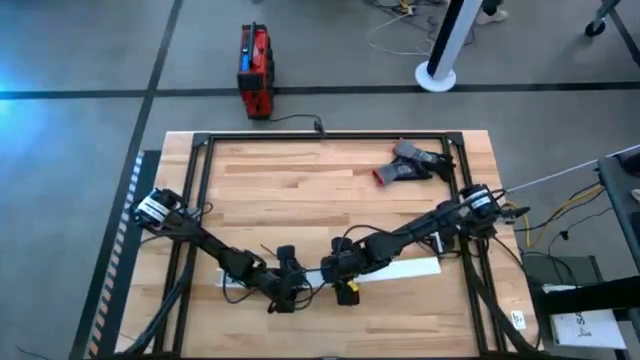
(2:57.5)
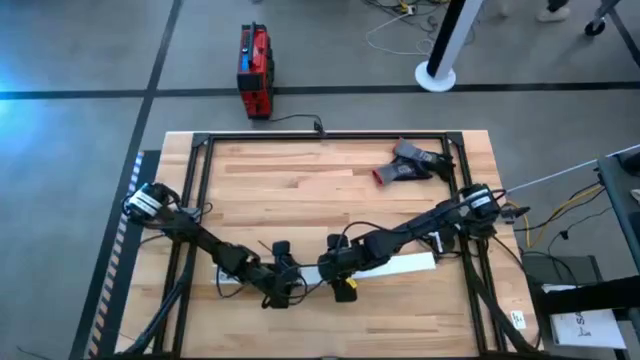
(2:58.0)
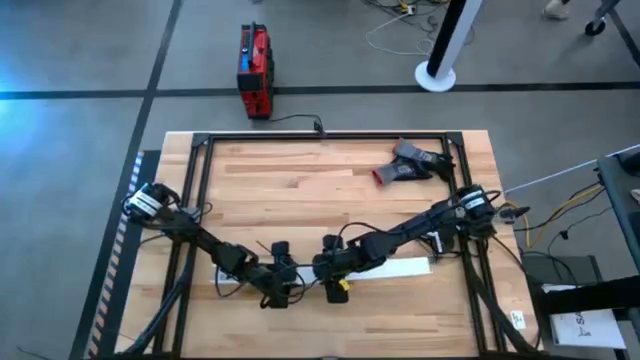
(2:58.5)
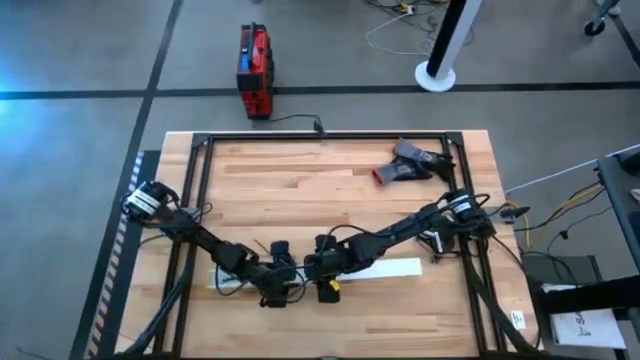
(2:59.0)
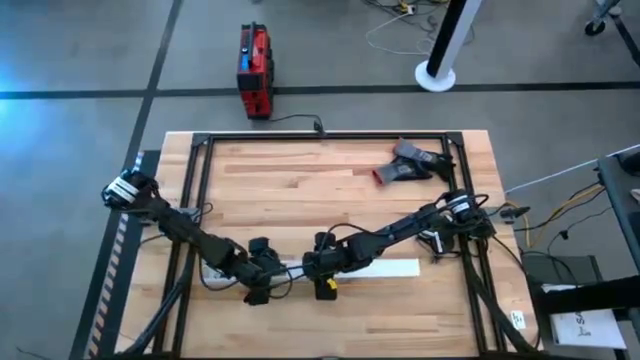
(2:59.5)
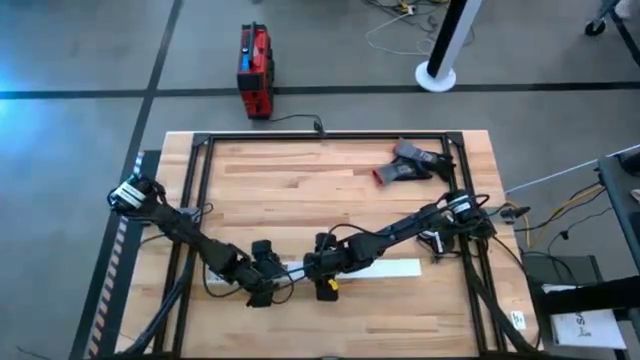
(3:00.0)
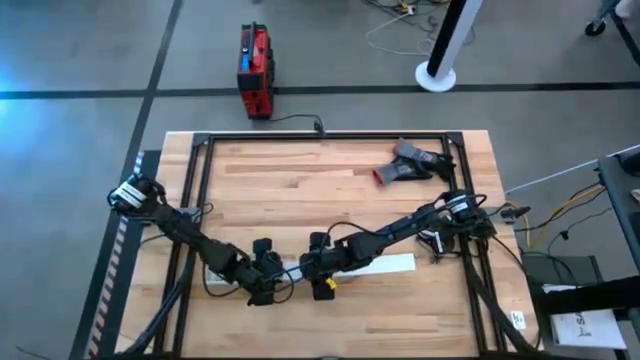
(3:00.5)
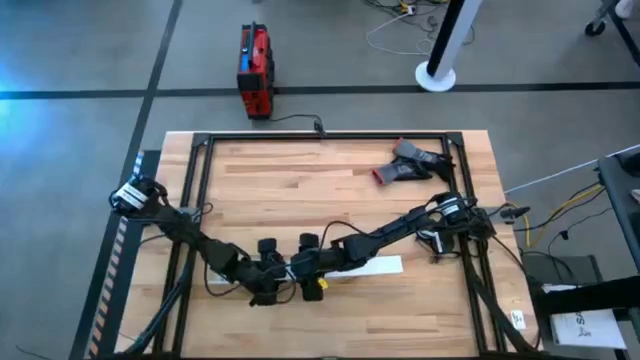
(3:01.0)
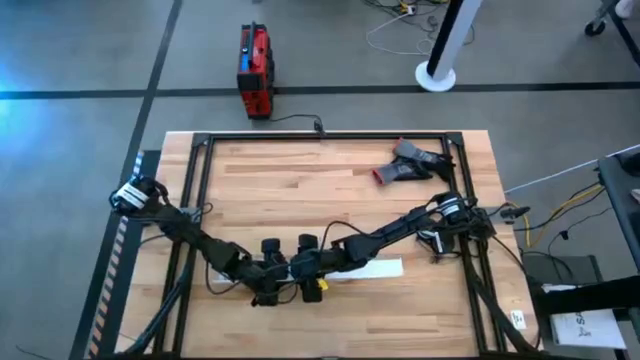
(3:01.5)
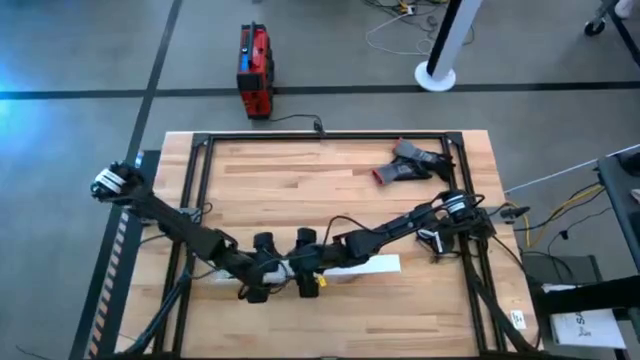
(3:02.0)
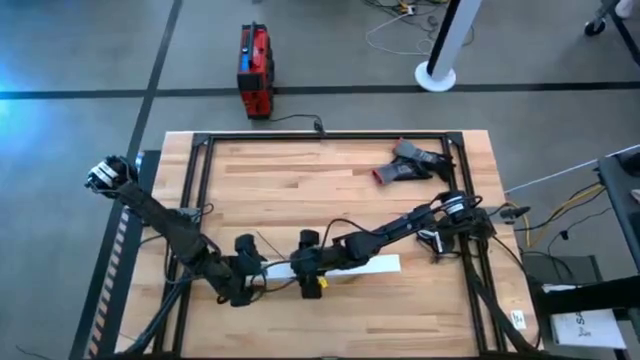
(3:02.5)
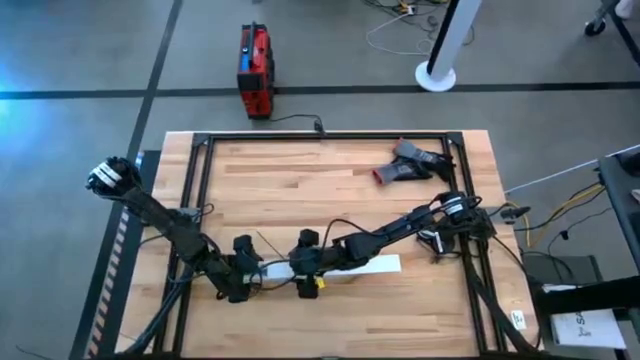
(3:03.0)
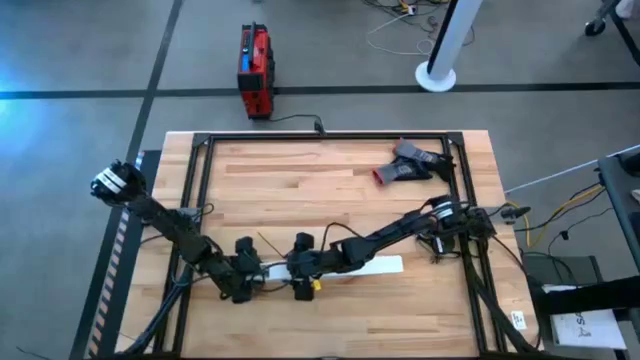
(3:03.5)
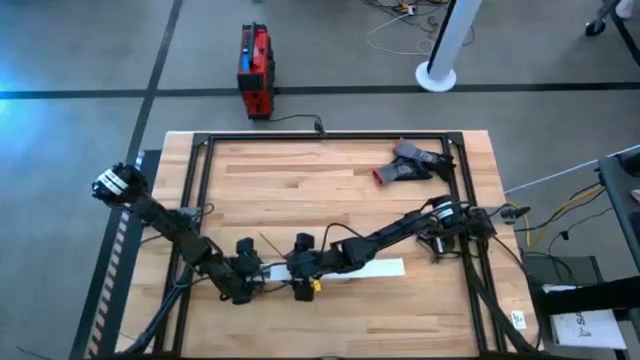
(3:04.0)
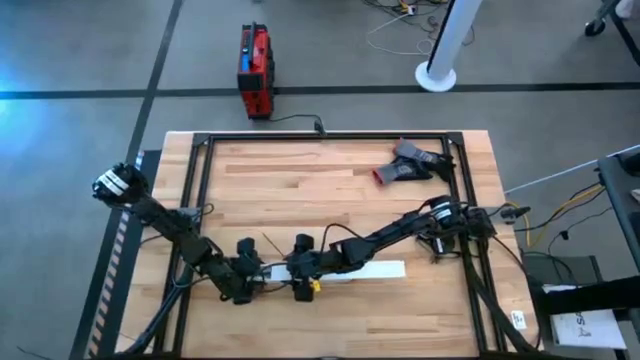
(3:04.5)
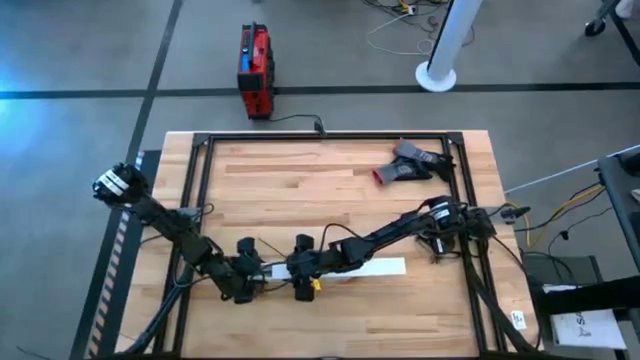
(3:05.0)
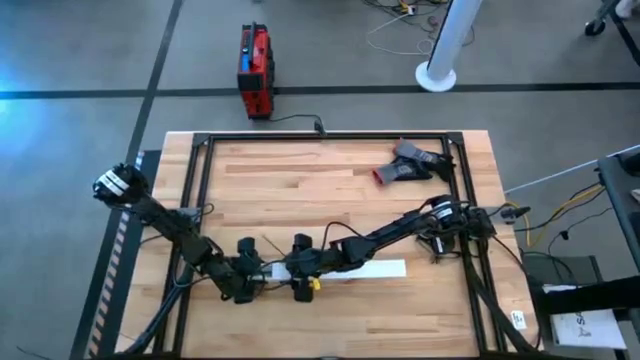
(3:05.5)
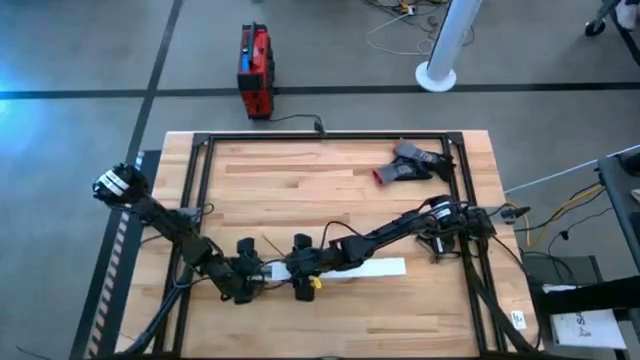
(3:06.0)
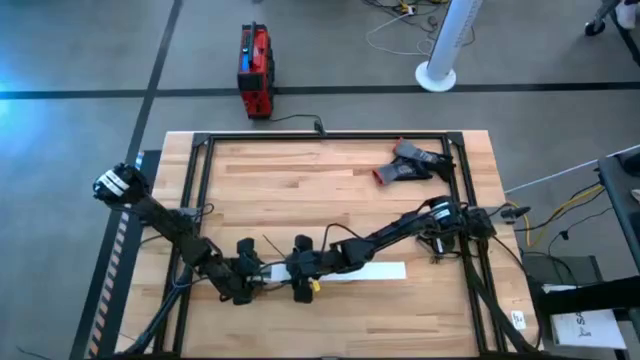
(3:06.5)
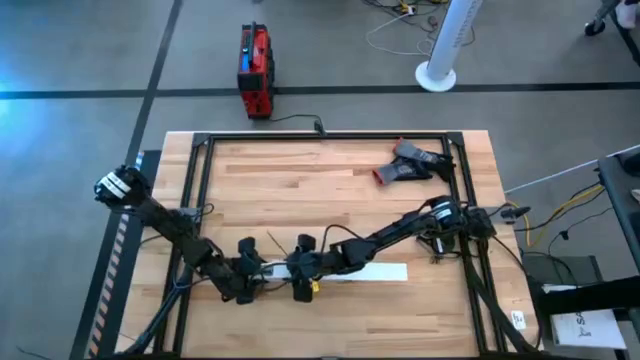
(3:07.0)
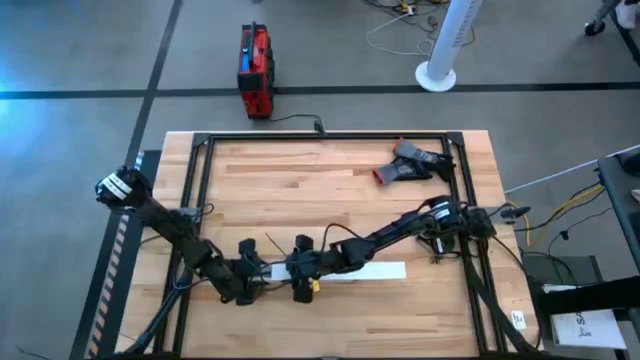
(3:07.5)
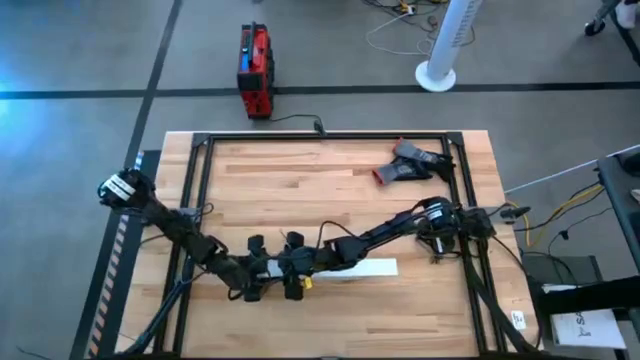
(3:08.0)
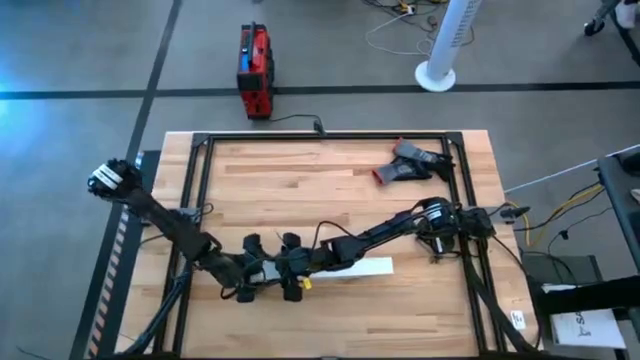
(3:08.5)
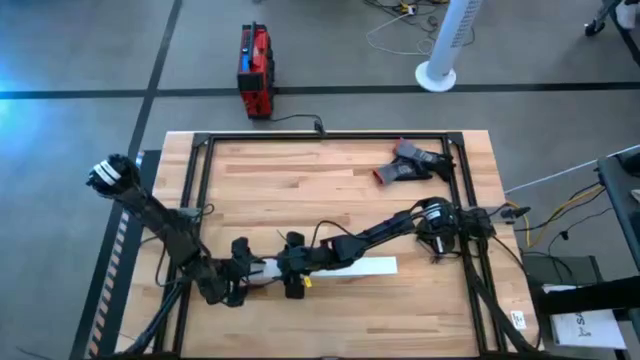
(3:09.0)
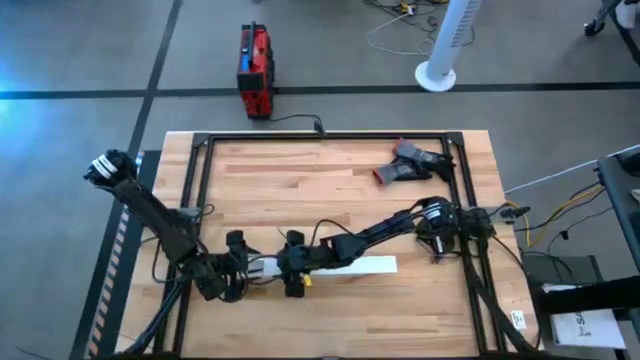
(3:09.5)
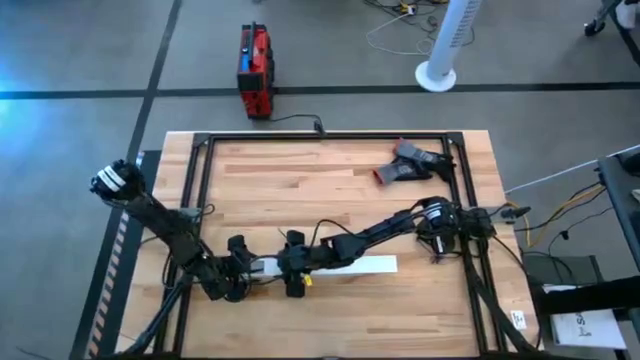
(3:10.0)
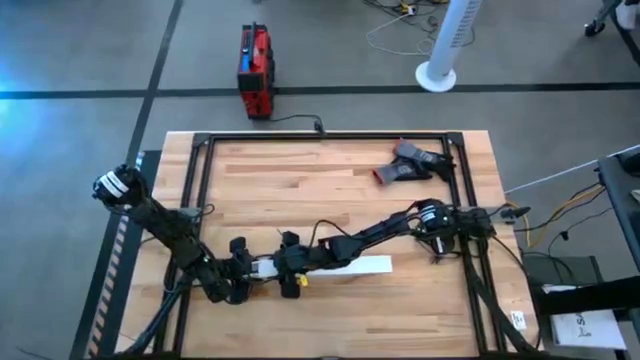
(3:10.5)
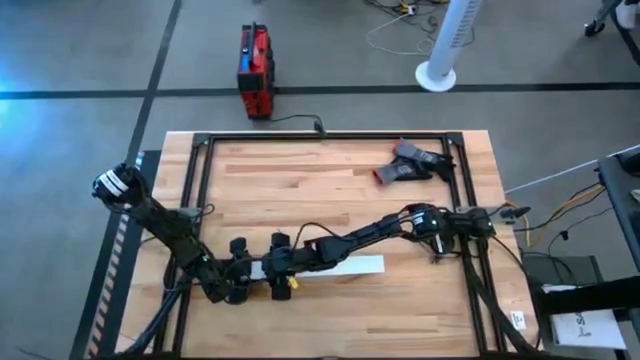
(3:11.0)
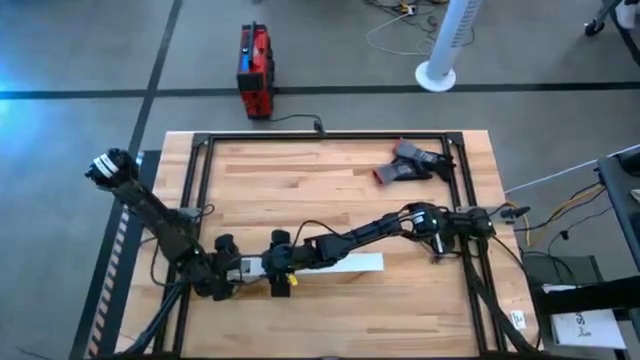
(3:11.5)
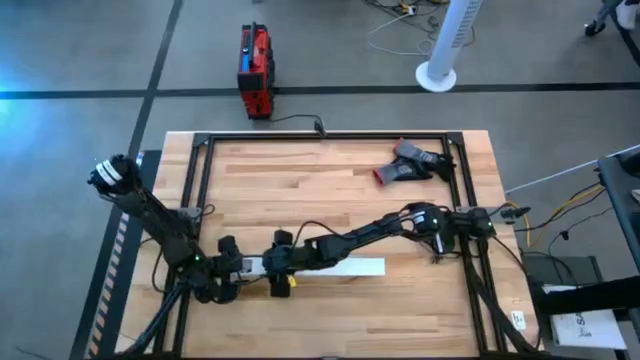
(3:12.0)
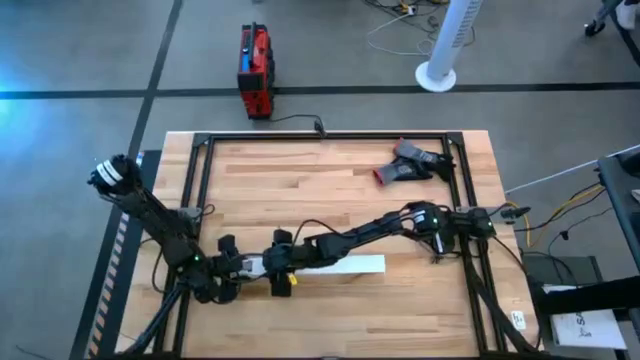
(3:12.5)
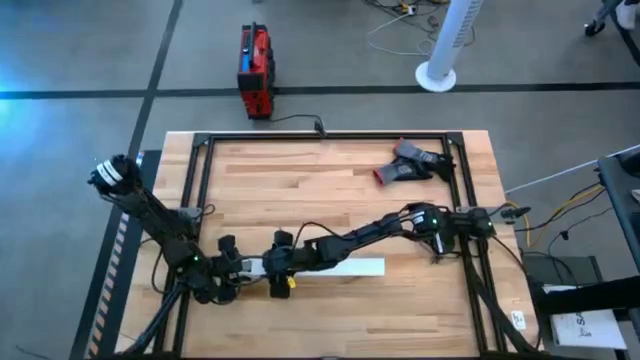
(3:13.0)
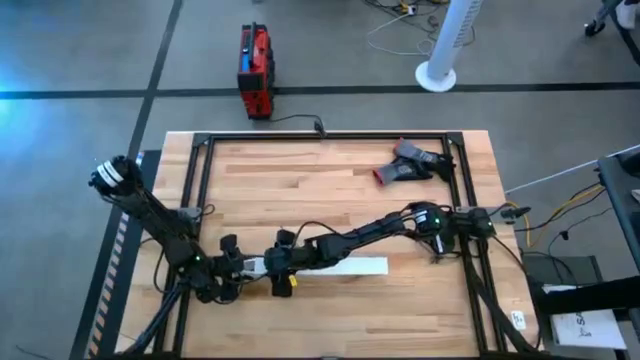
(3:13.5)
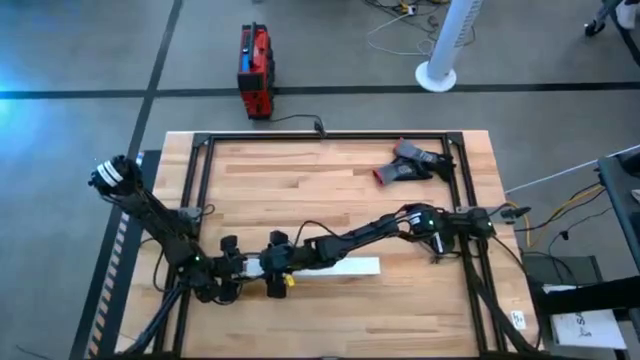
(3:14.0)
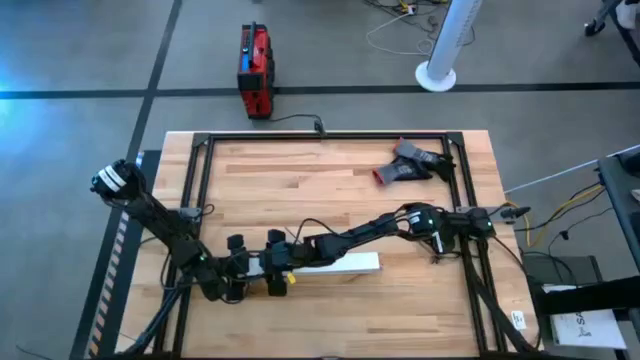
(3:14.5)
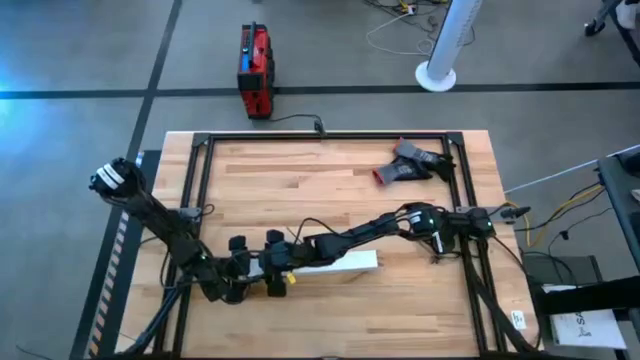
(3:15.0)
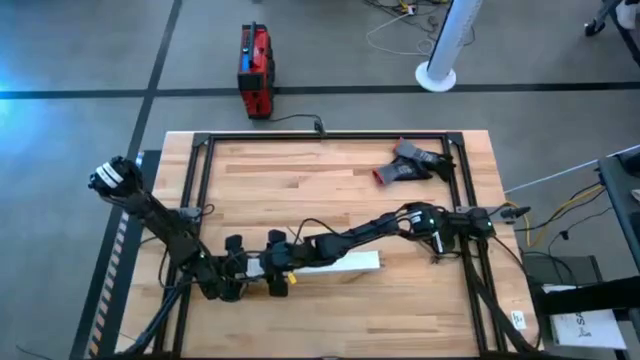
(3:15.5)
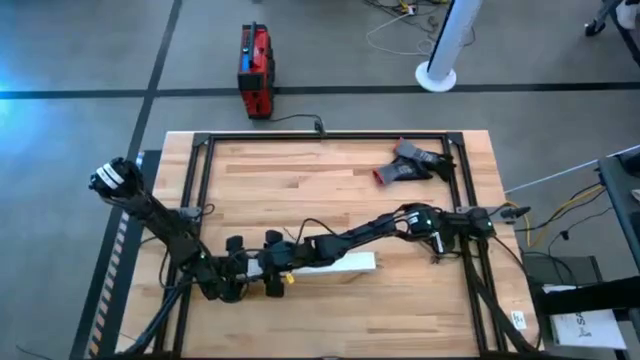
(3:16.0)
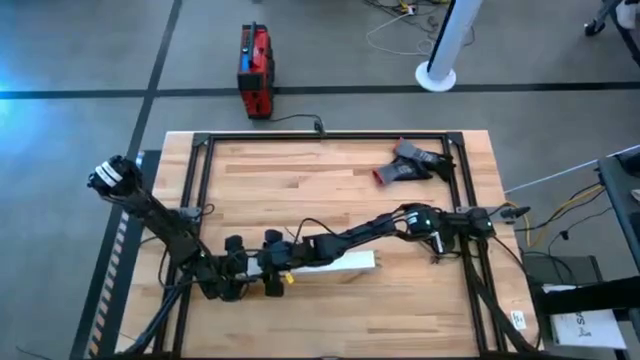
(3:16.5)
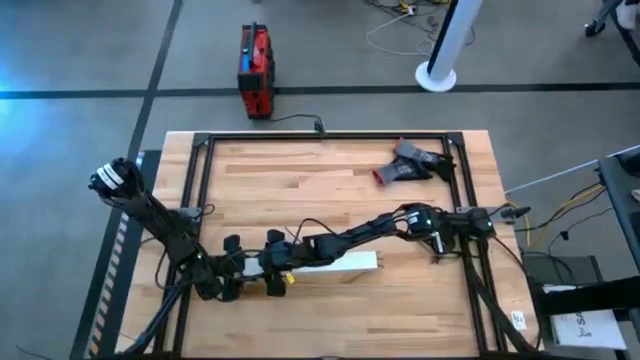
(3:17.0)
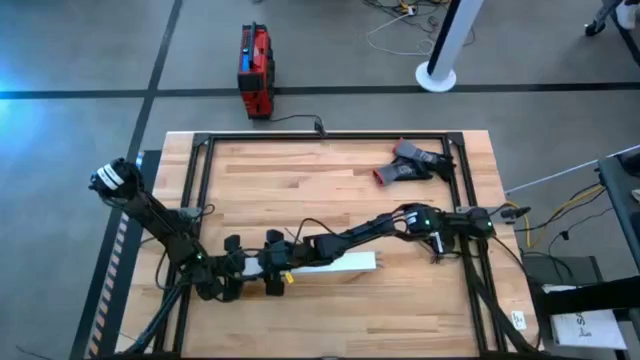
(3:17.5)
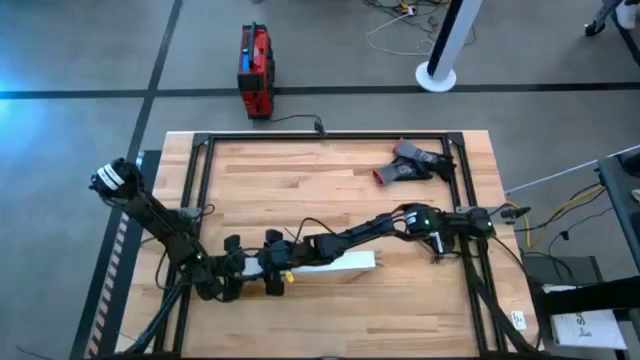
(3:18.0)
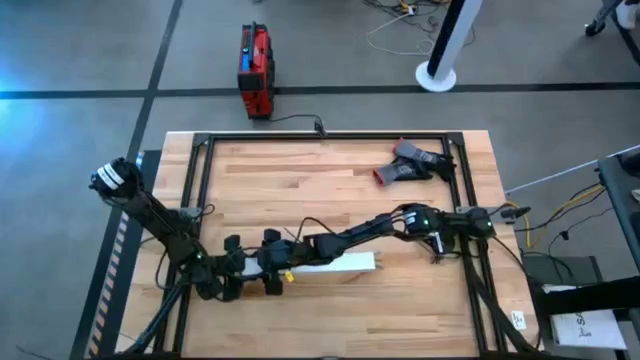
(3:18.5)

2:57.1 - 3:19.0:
Task: Ziptie cables
Close the white cable duct
